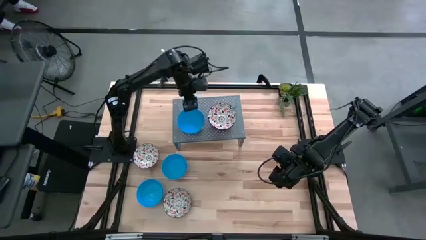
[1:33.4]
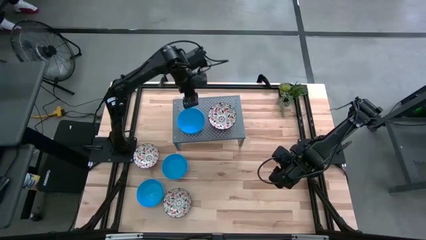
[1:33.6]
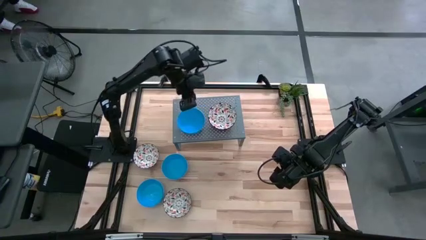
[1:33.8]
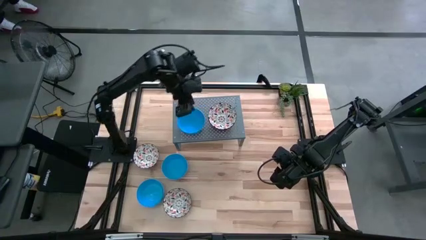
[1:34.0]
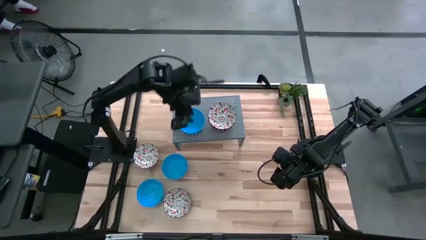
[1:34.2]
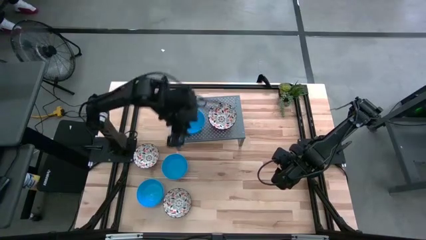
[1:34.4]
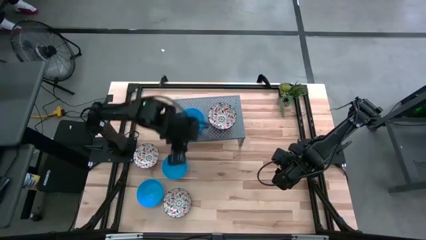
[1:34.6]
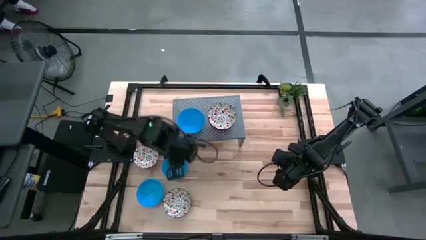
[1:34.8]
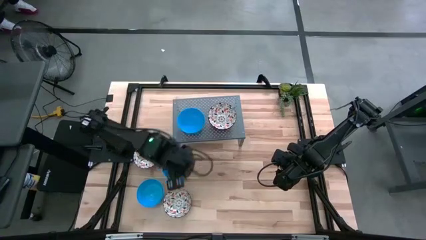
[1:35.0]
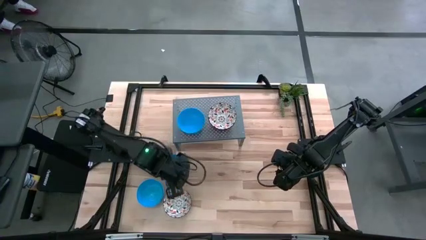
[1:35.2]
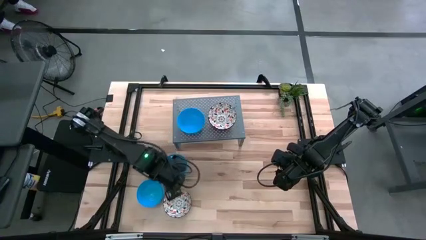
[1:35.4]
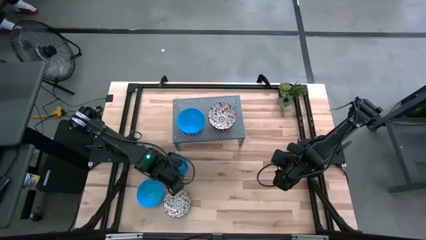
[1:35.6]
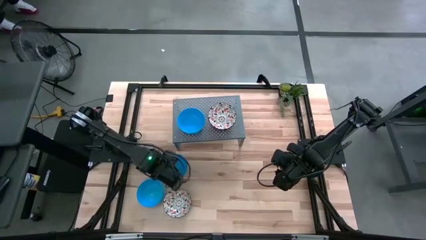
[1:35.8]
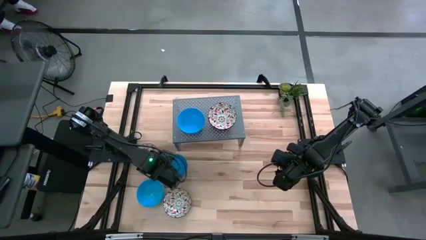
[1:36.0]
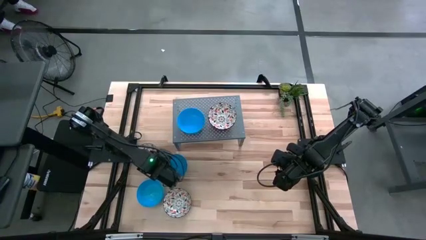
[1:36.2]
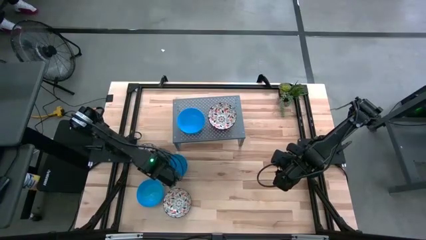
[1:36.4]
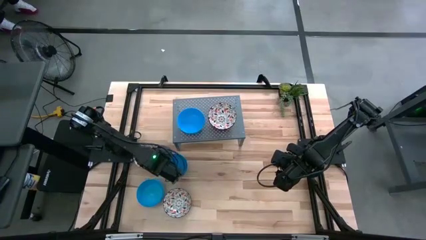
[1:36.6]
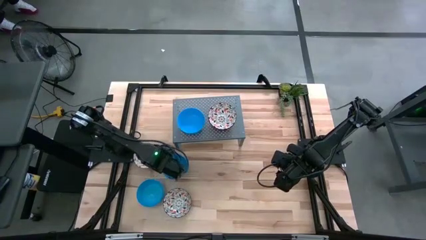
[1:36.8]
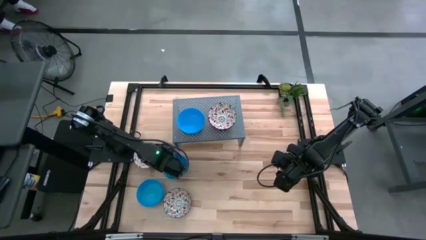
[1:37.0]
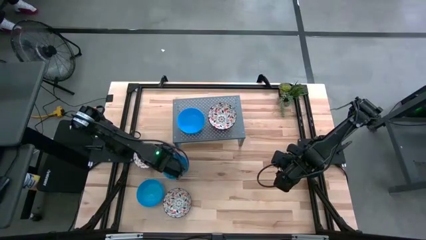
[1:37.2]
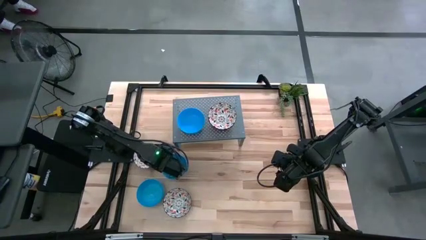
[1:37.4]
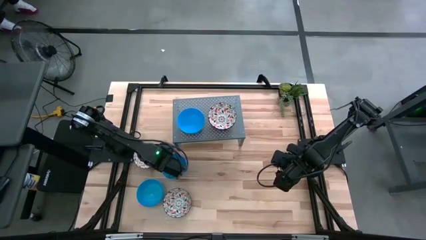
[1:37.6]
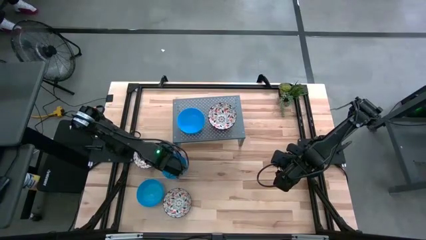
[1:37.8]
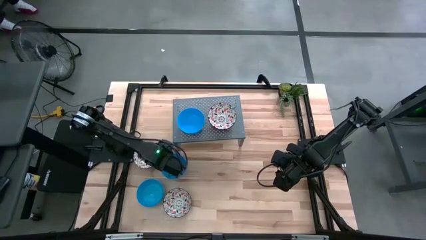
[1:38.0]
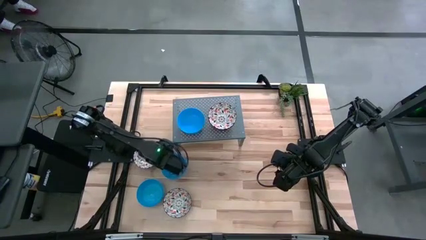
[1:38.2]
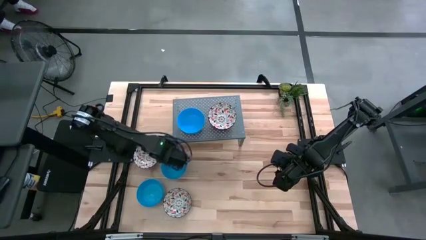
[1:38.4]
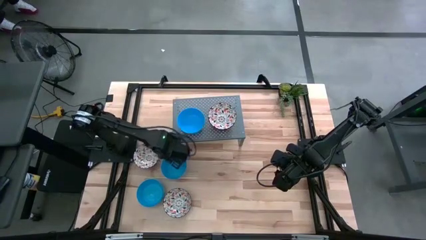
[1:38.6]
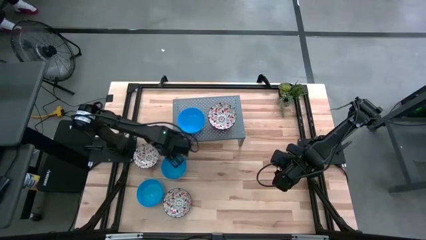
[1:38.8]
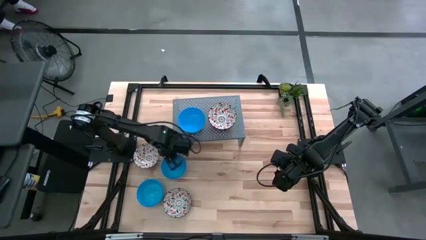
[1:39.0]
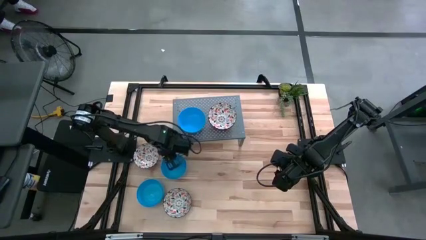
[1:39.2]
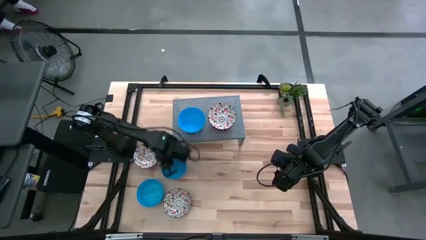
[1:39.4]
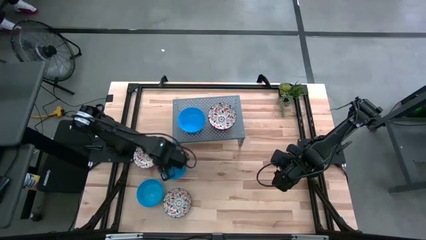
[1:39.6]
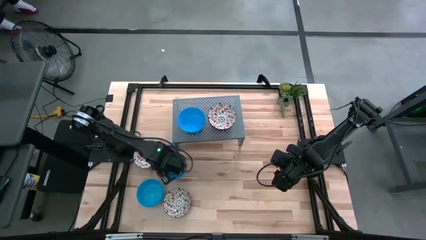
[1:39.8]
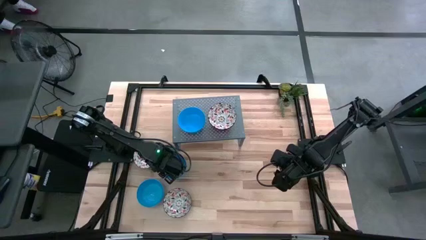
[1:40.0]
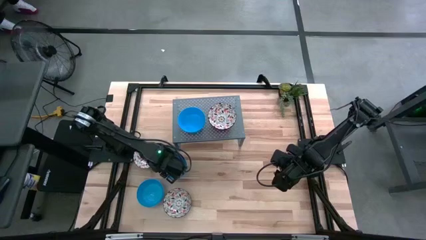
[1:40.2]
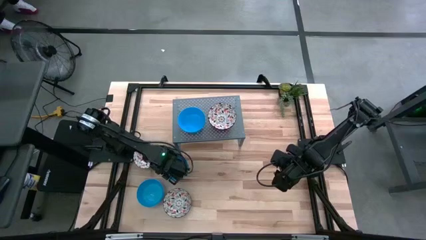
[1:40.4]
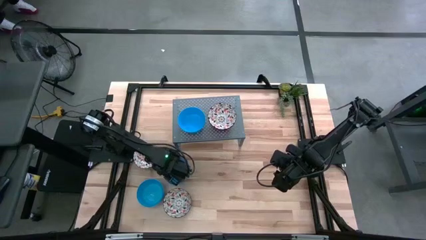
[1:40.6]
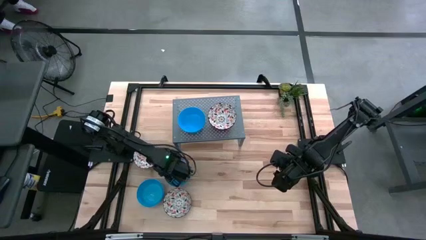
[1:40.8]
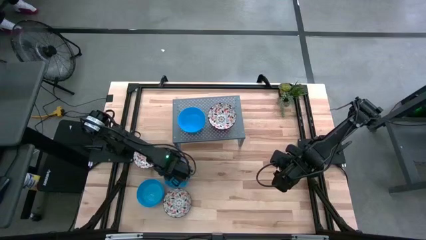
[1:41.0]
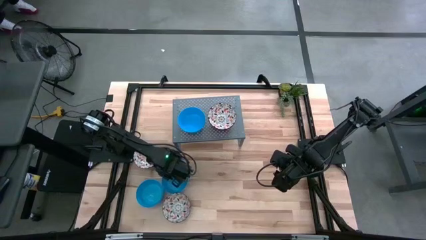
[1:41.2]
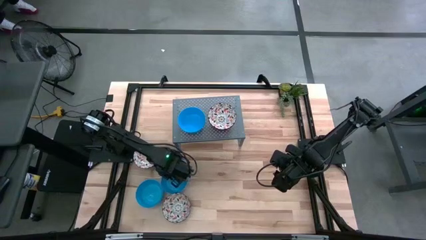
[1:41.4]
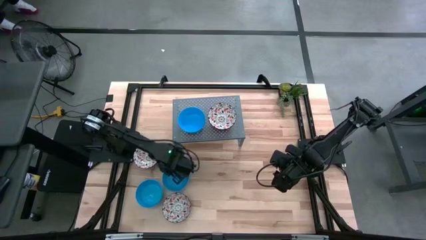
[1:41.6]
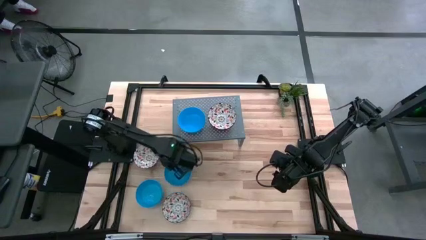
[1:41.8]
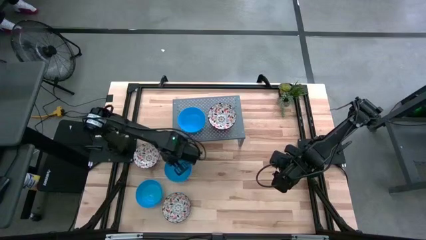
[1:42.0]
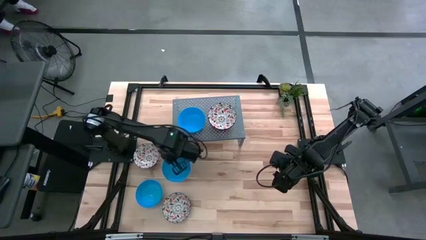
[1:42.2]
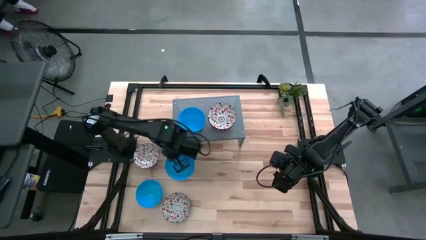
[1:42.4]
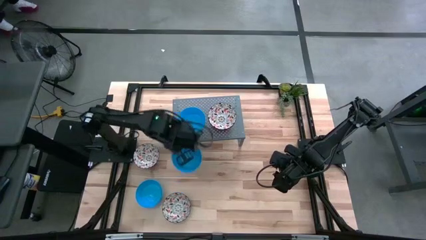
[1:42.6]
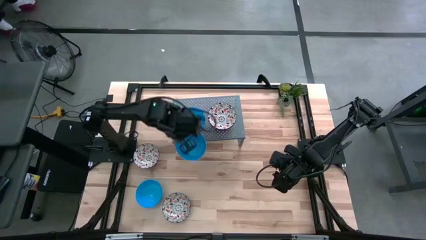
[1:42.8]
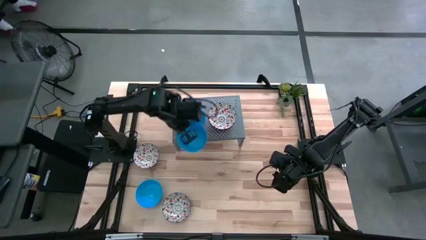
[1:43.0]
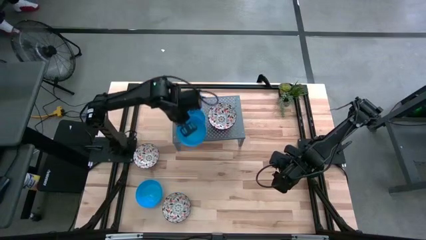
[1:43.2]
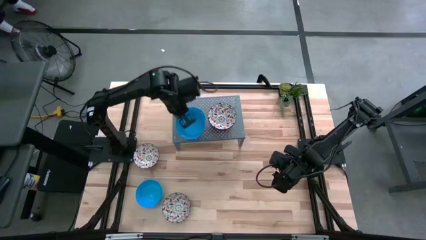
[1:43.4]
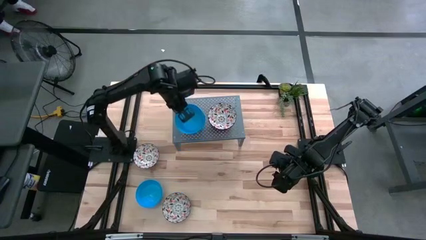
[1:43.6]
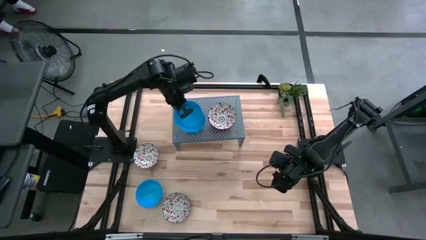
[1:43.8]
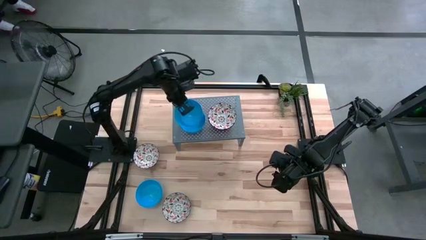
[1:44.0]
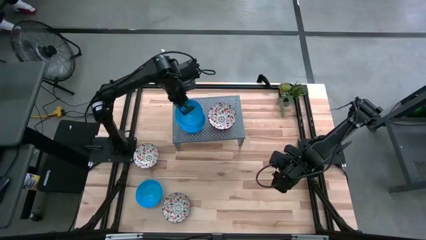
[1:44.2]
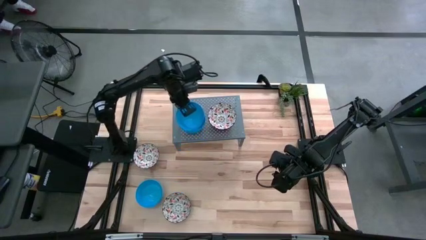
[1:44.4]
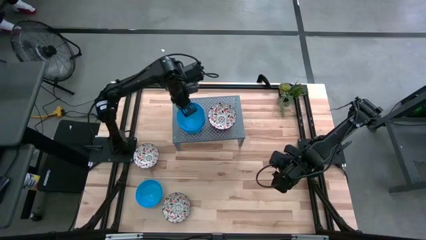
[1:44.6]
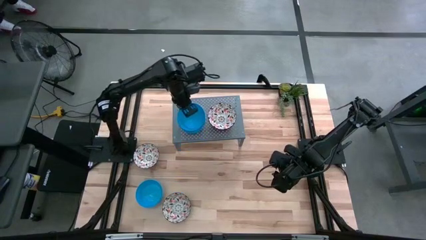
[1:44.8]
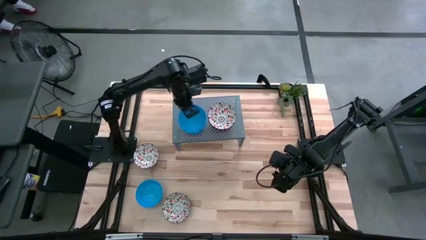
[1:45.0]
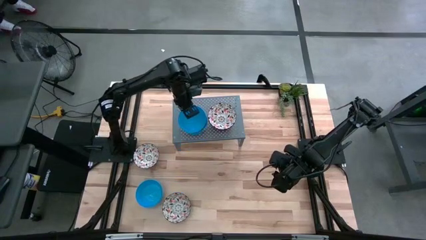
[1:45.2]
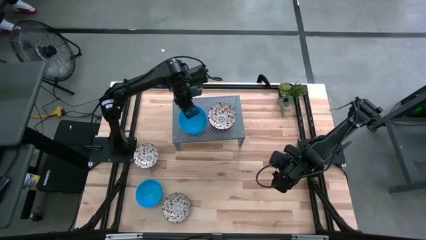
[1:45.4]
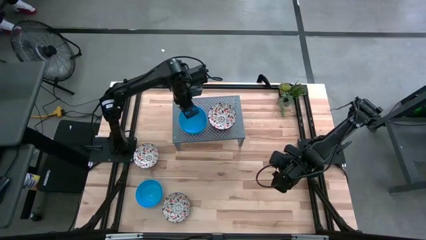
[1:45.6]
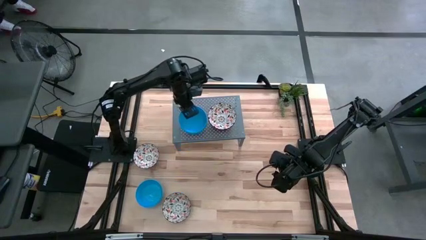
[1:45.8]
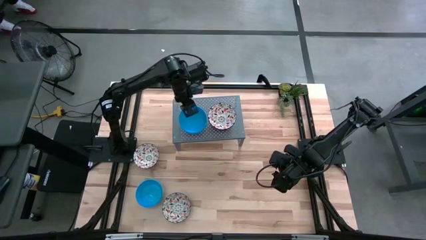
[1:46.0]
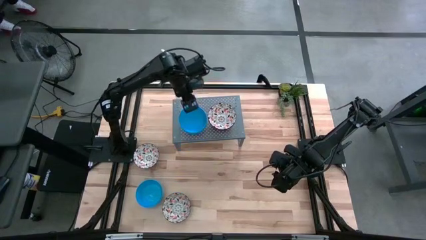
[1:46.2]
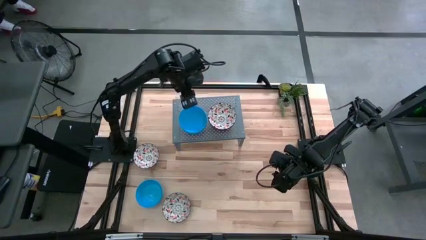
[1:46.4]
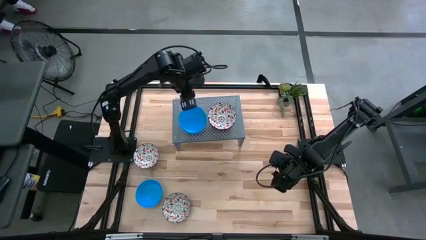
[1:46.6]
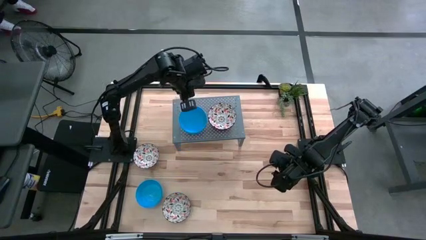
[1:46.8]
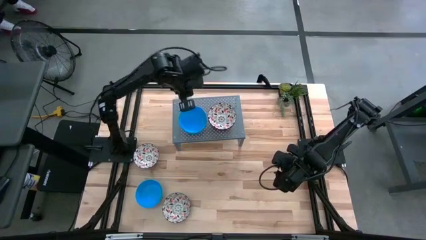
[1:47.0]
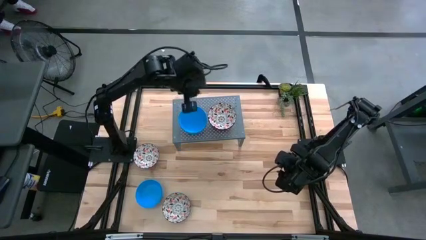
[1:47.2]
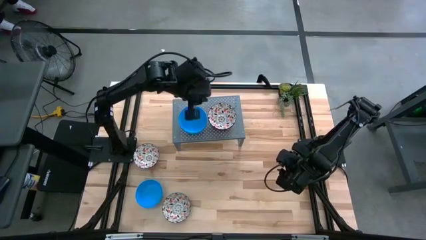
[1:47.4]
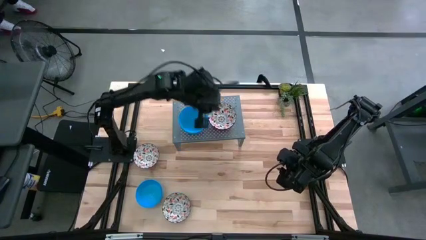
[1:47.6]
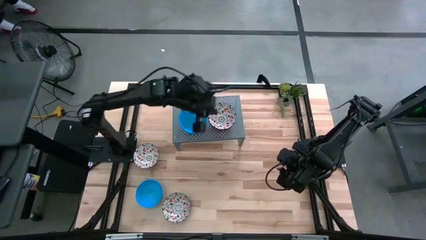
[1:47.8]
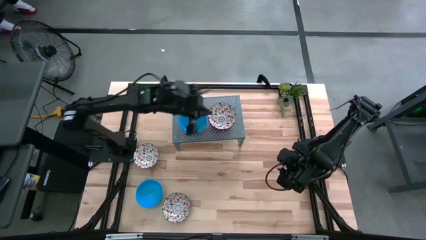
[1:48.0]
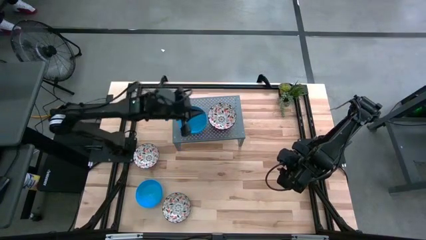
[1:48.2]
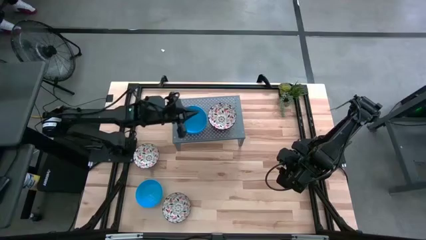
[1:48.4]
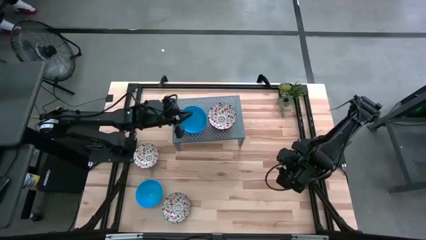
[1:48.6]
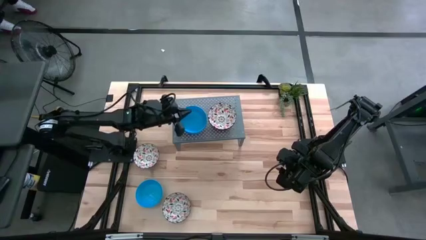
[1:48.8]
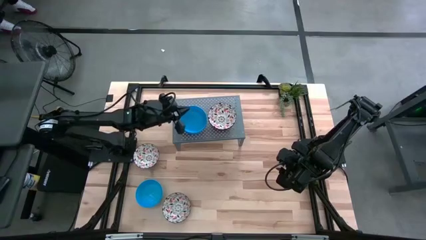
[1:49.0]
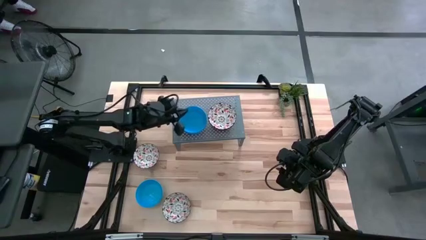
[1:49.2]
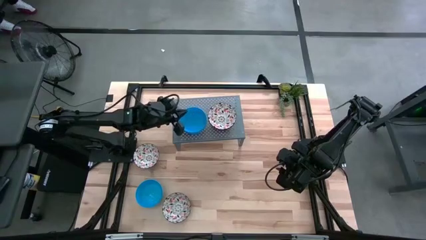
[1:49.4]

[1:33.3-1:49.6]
Task: Pick & Place Mini bowls
Stack the blue bowl on top of the blue bowls on the shelf

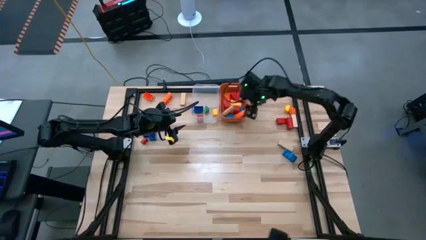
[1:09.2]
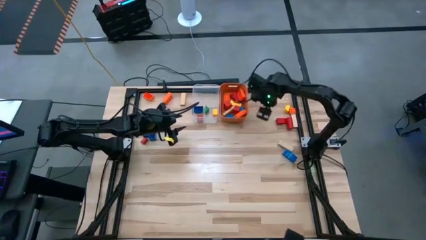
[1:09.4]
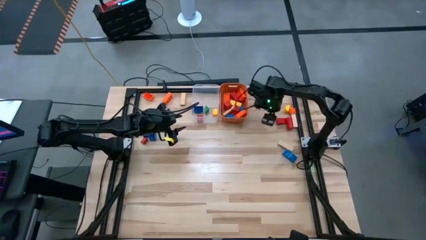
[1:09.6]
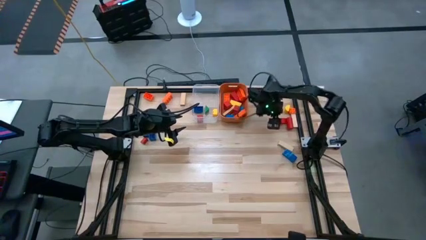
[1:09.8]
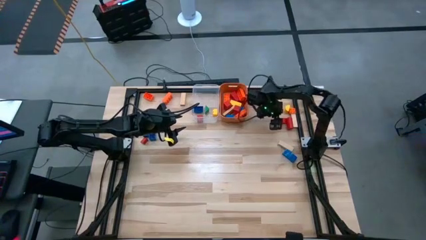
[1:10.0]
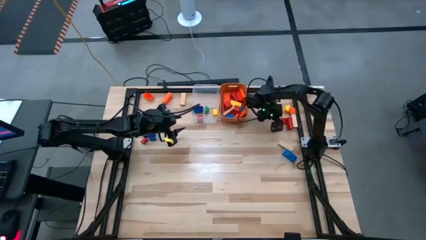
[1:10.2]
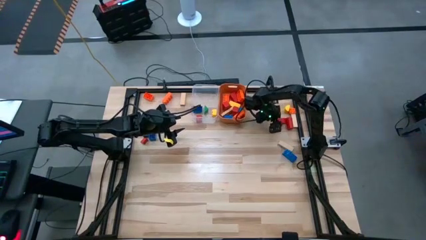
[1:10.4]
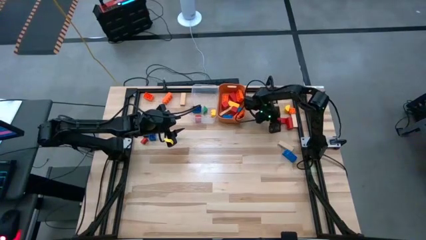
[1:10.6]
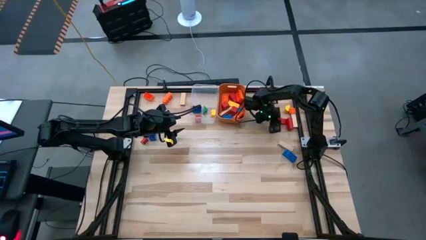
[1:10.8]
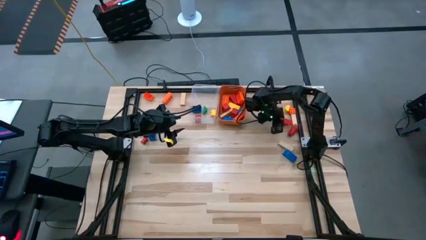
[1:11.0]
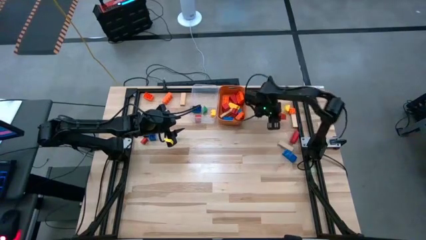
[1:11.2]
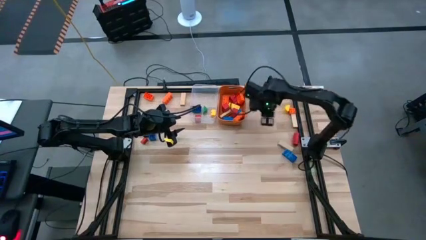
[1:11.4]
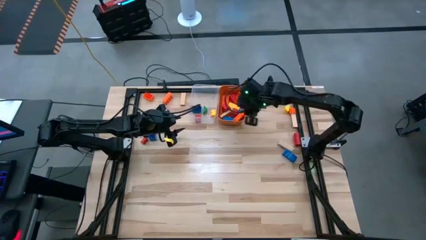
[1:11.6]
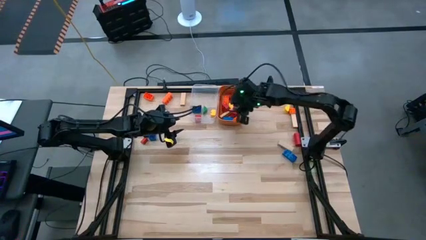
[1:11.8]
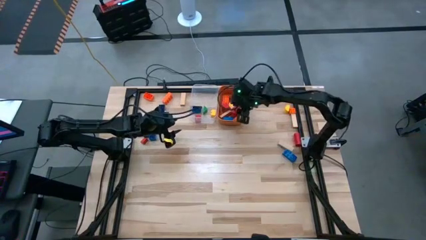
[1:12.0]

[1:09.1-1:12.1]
Task: Sort blocks by size
Put the red wedge block into the orange bin
